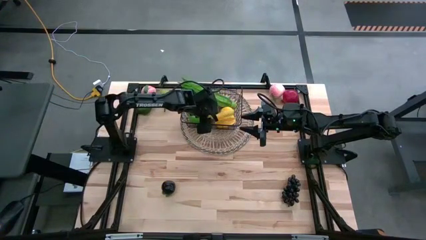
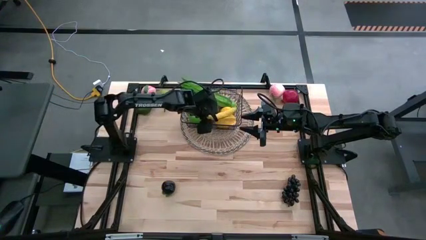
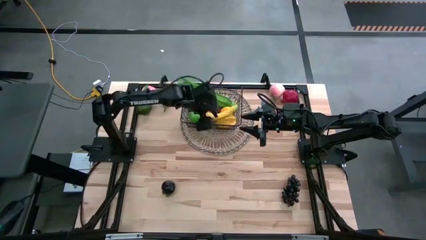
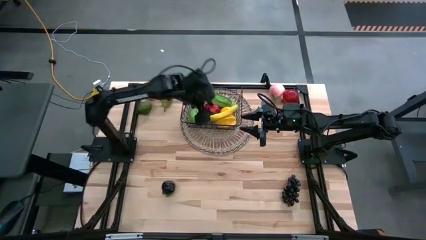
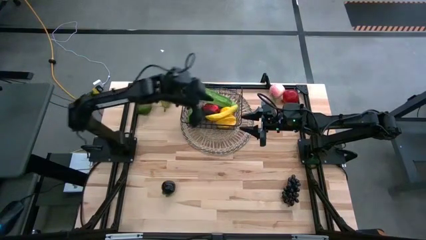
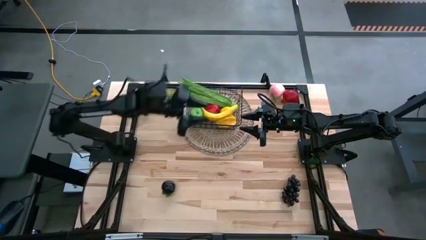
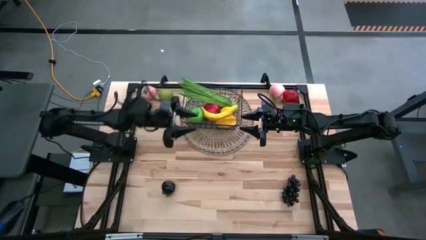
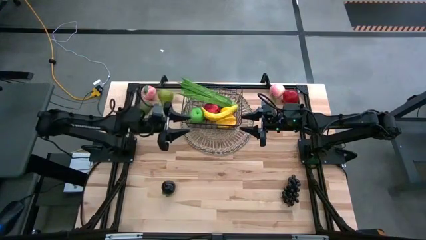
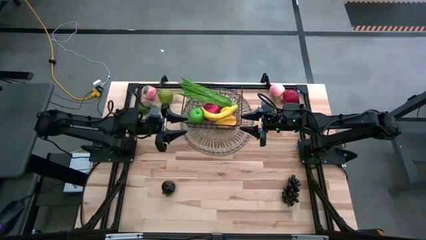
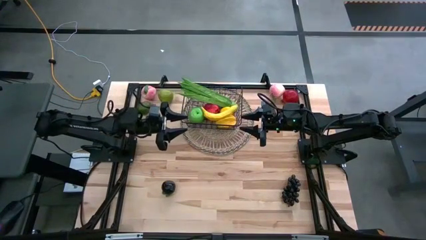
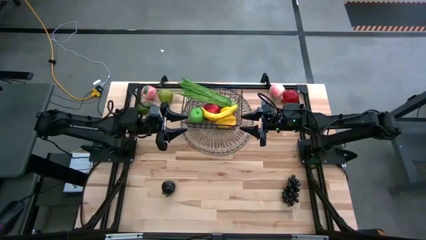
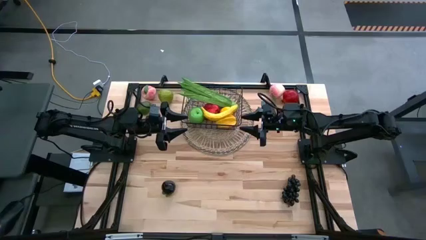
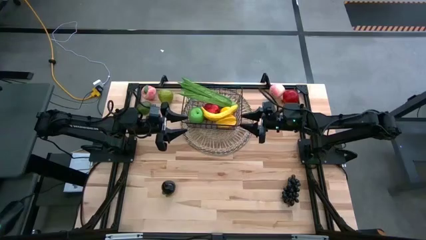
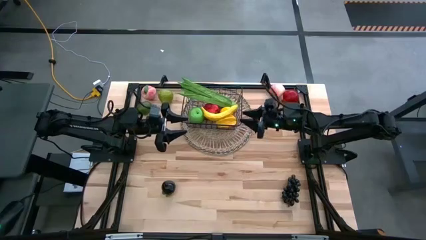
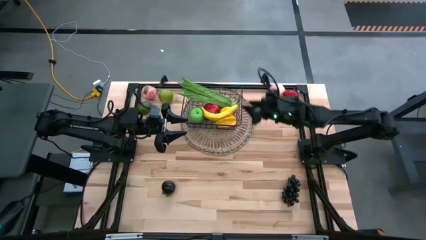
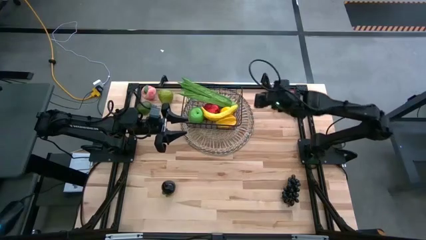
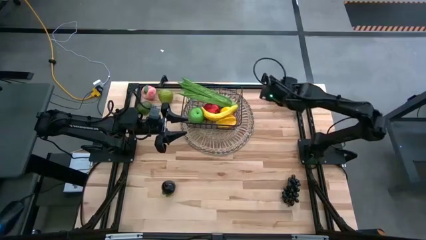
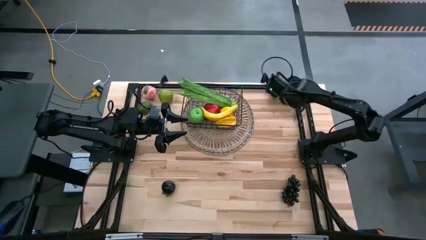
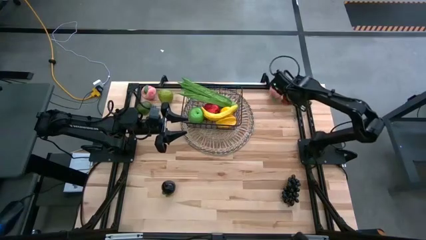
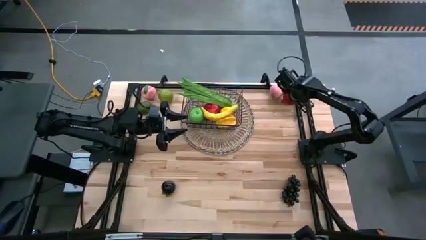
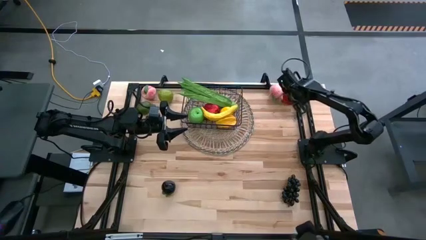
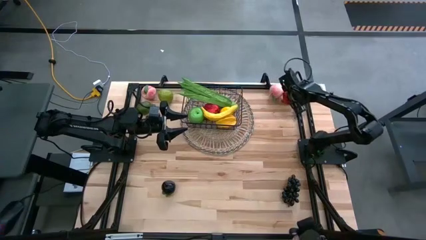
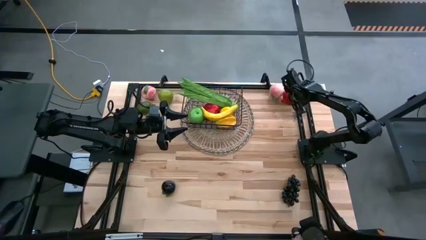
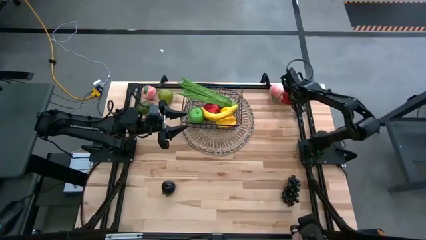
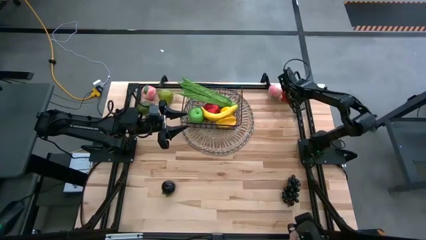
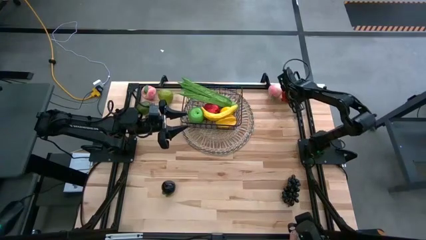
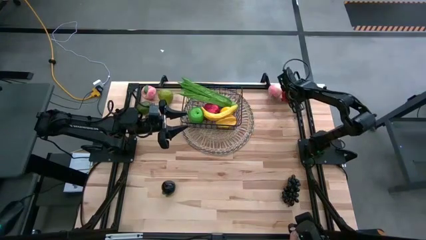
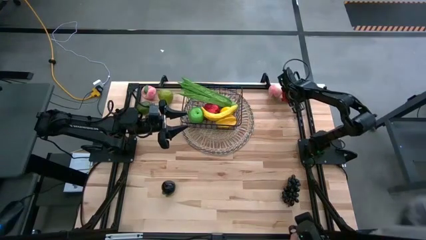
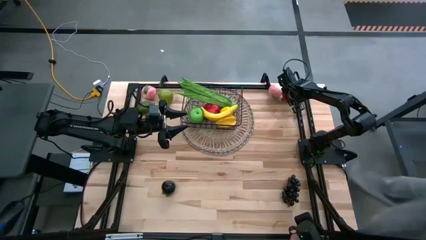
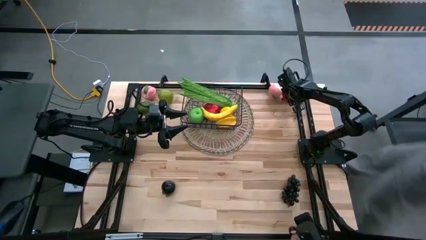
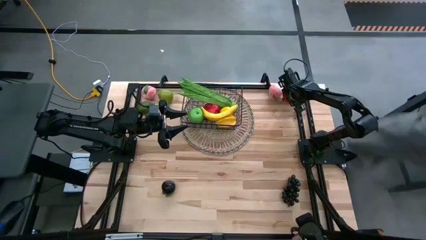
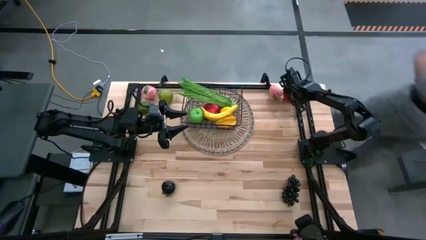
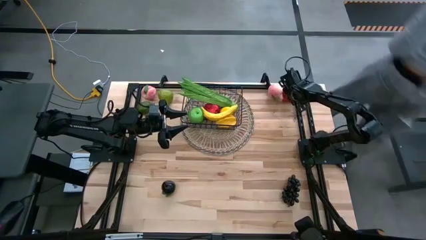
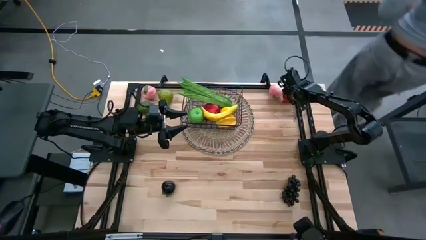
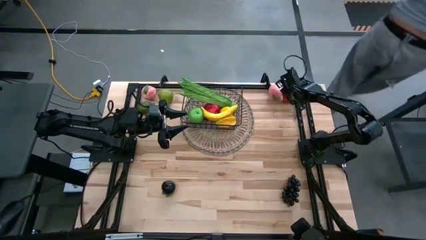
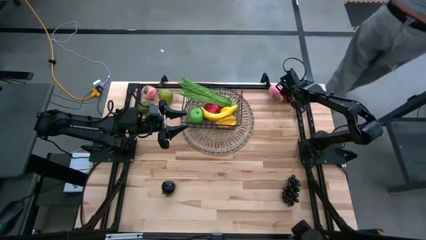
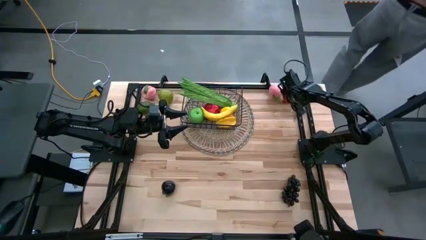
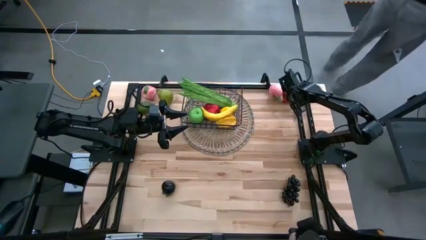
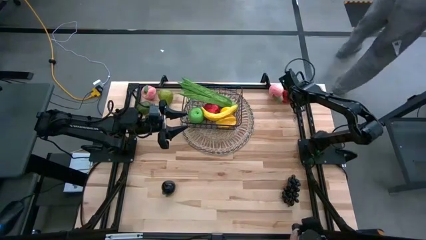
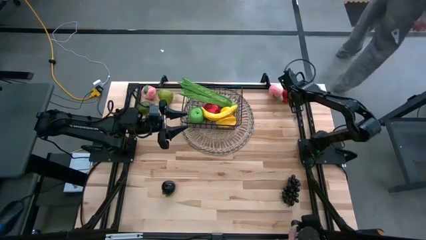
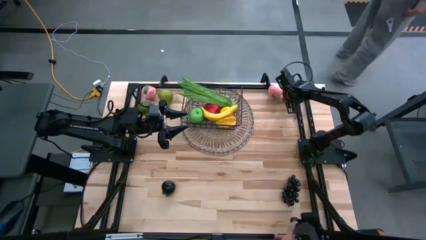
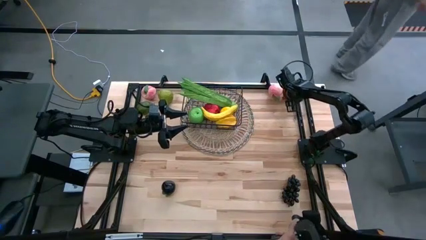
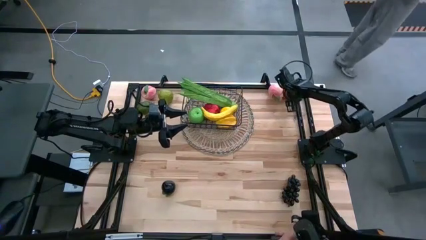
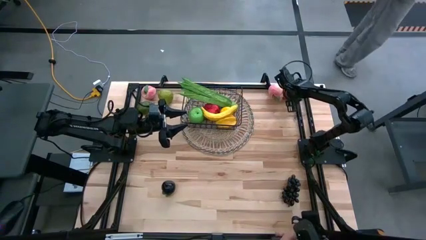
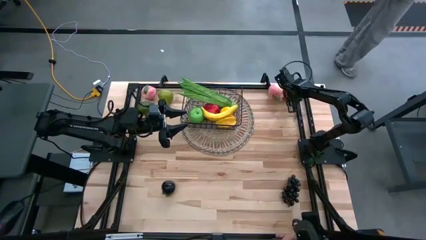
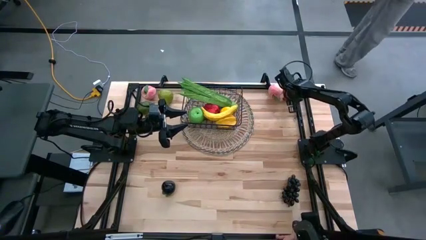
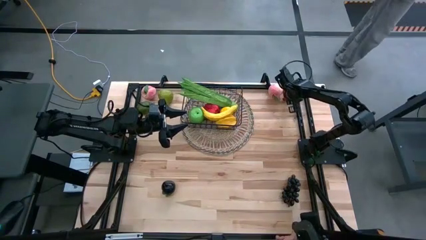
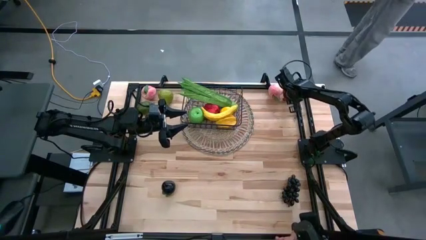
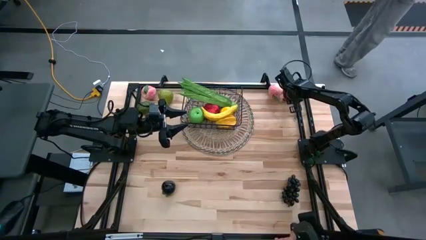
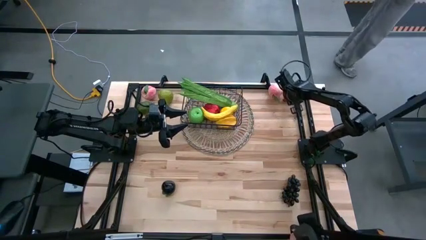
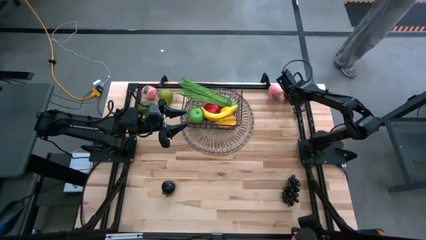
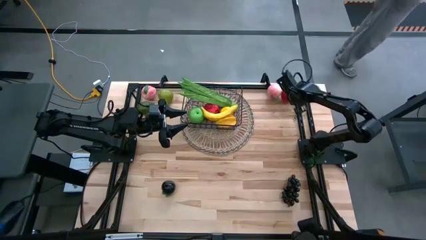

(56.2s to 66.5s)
Task: Build produce basket
Put the pomegranate into the black wire basket

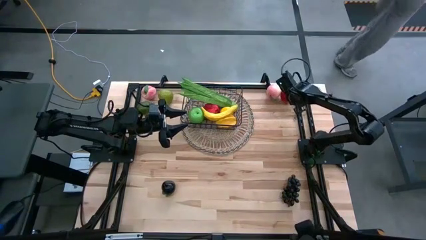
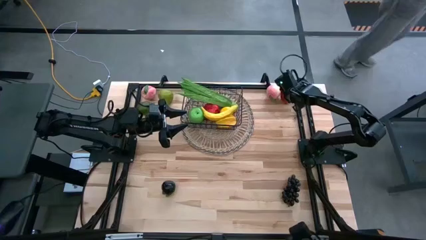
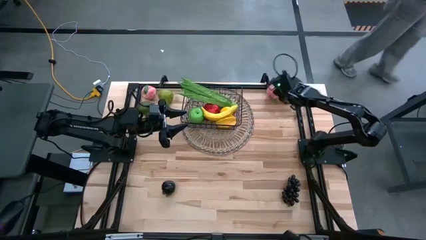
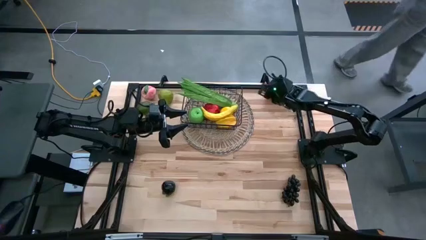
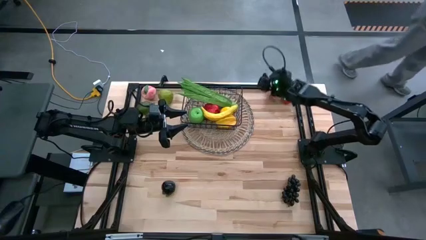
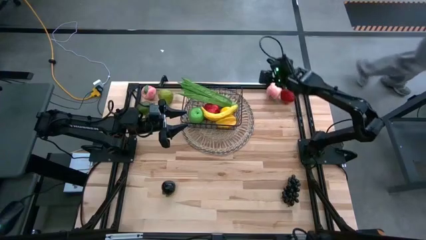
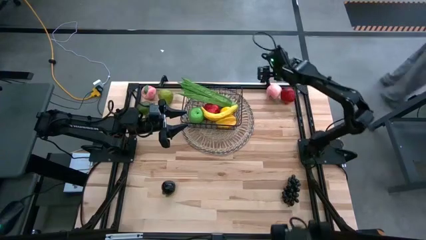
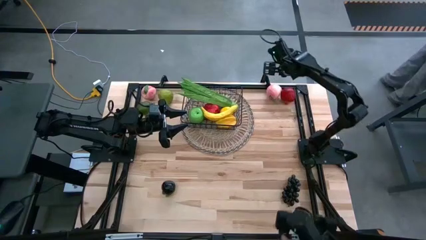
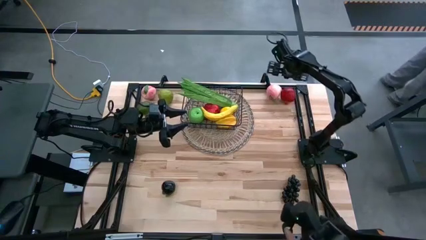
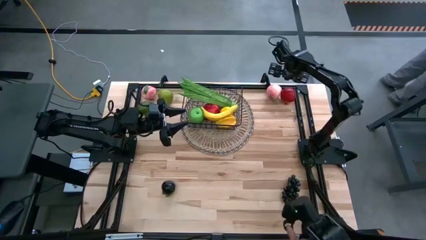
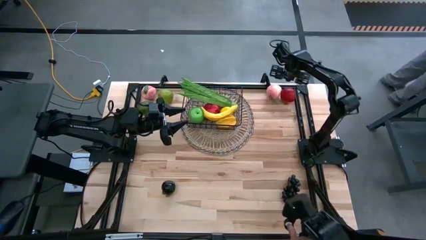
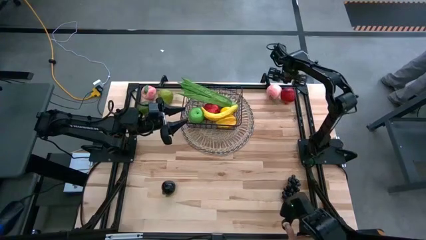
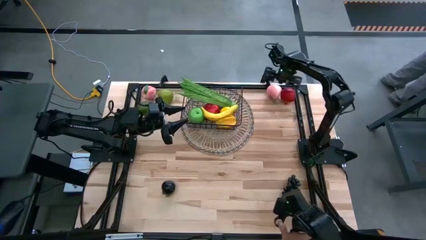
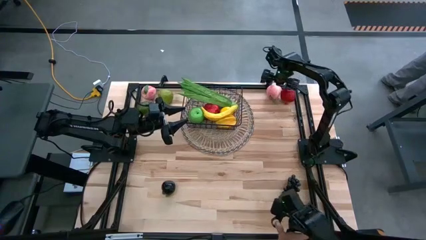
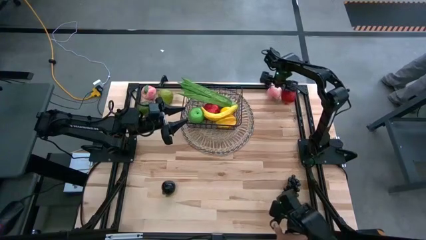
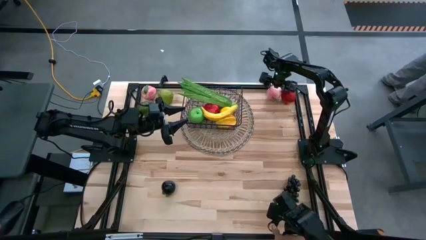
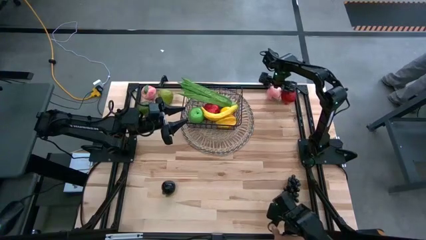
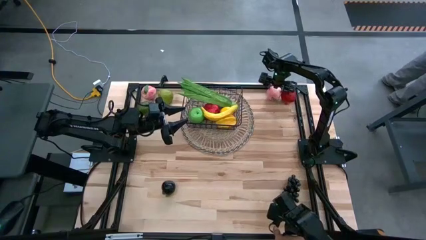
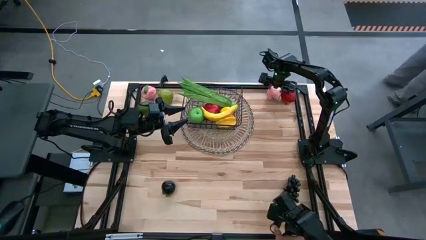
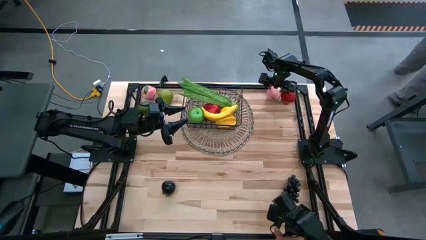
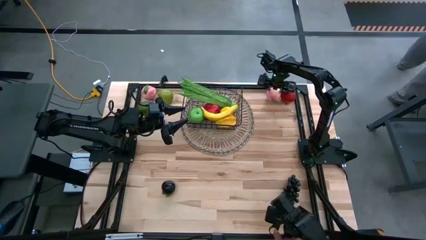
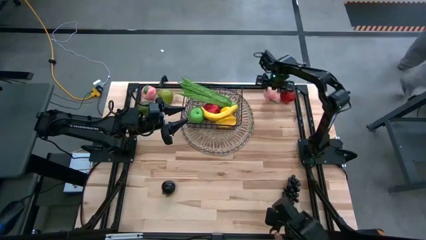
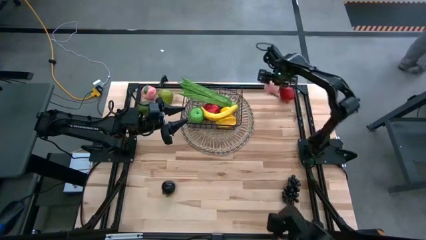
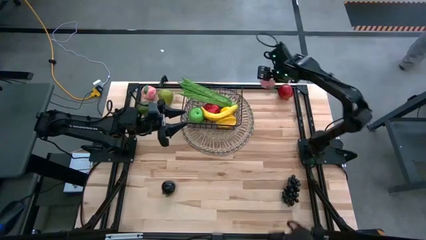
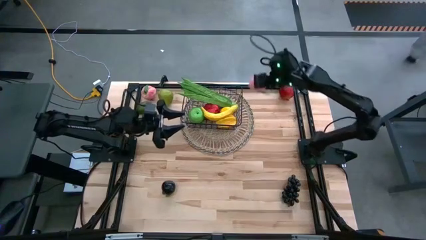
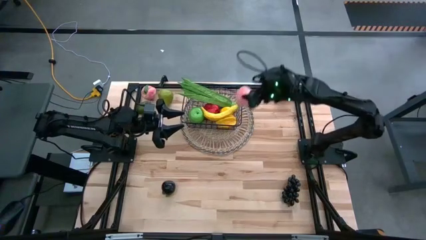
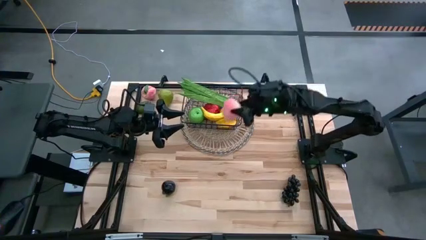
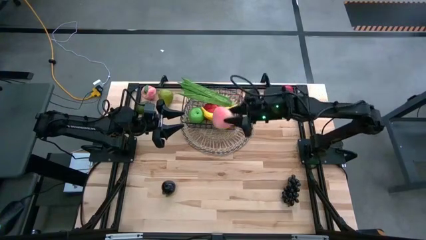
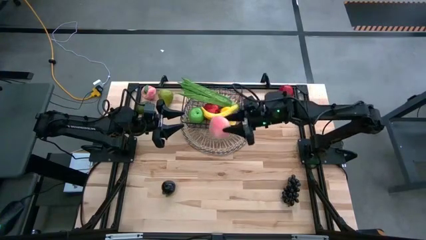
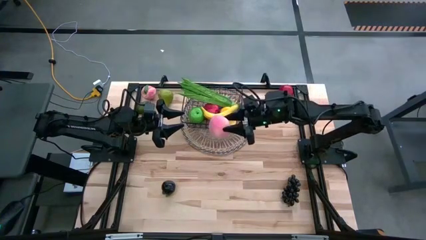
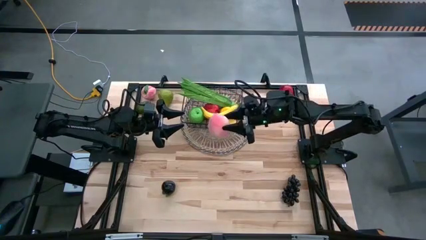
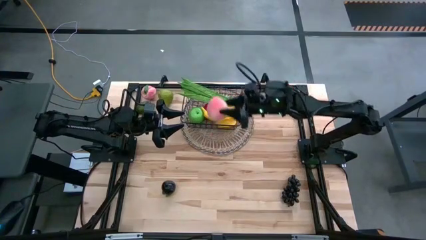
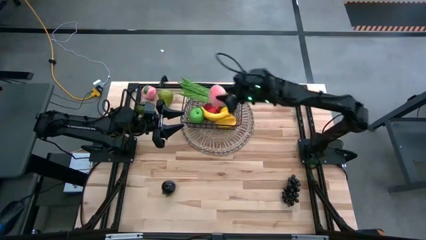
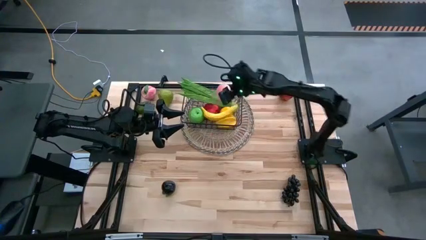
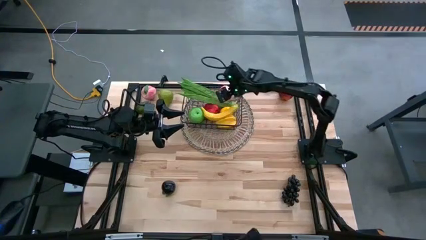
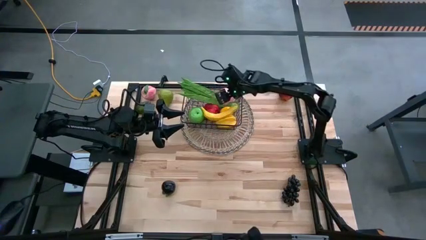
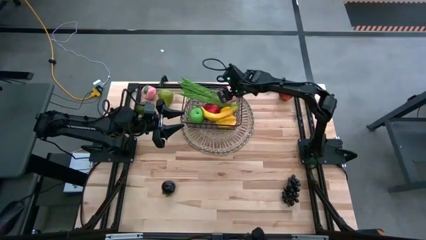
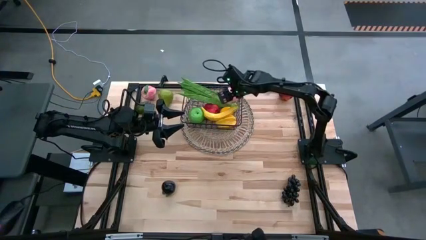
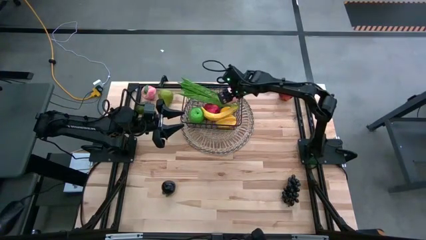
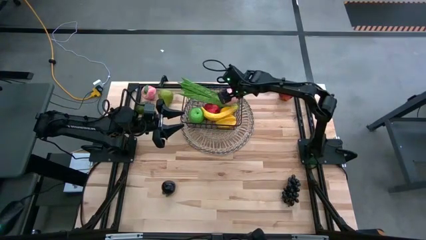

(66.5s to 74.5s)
Put the right peach into the black wire basket
